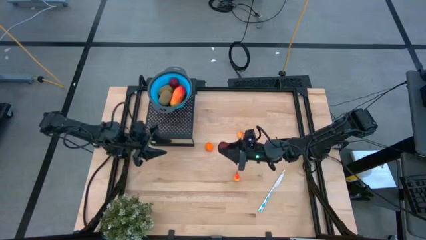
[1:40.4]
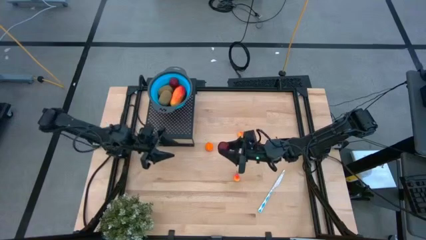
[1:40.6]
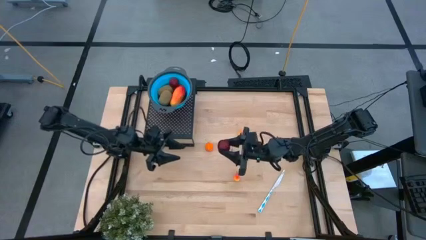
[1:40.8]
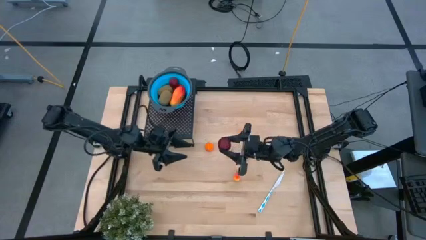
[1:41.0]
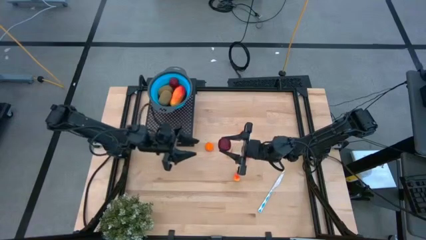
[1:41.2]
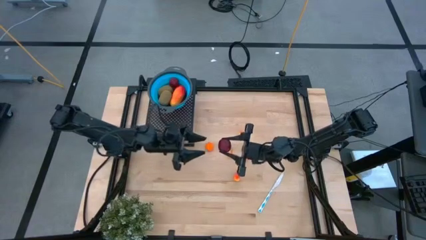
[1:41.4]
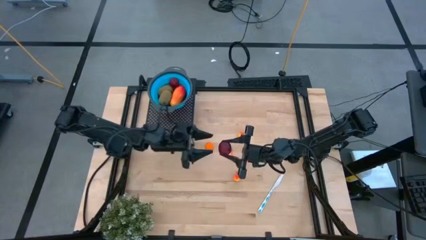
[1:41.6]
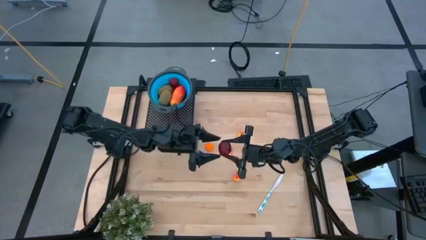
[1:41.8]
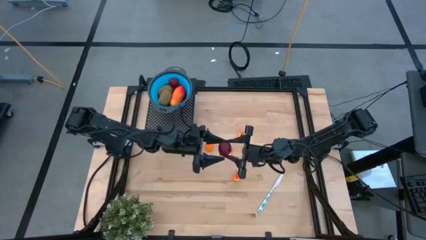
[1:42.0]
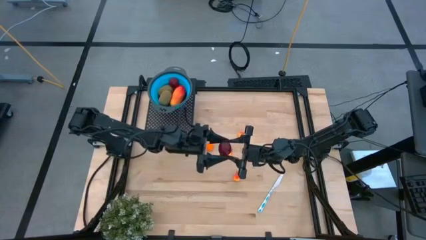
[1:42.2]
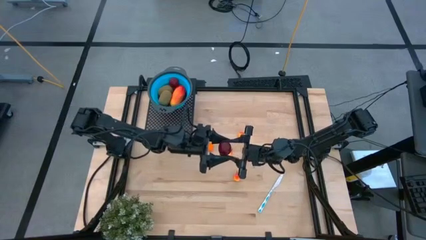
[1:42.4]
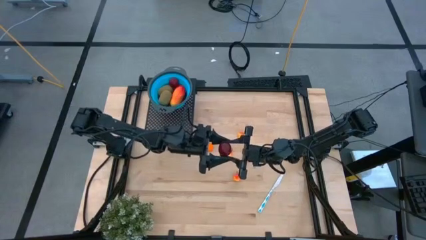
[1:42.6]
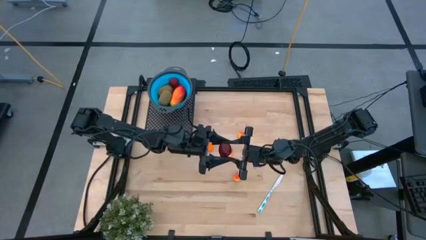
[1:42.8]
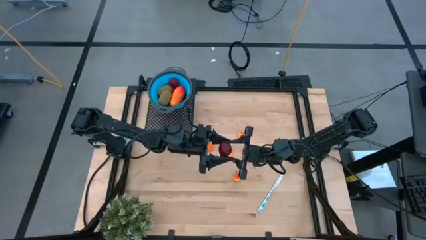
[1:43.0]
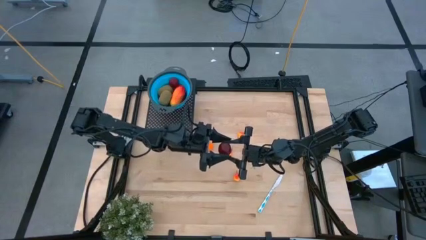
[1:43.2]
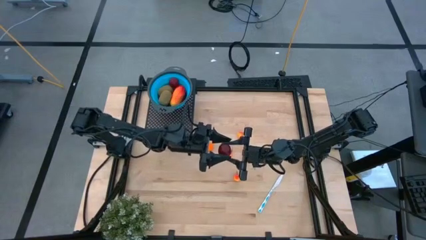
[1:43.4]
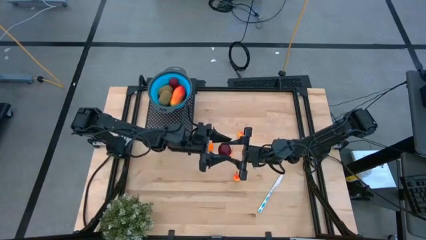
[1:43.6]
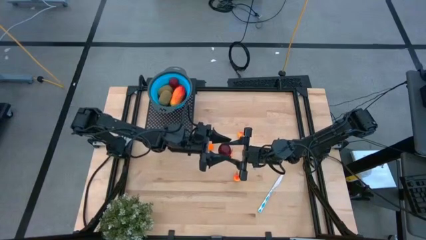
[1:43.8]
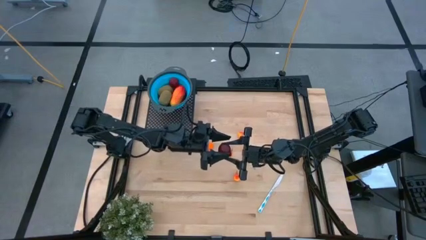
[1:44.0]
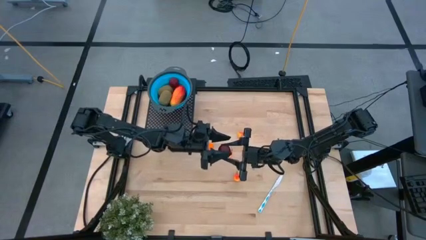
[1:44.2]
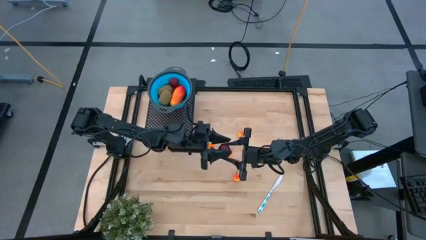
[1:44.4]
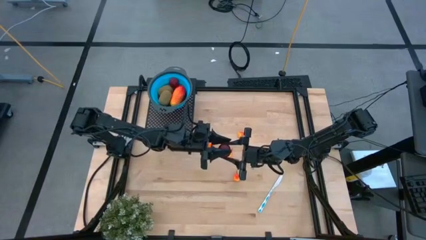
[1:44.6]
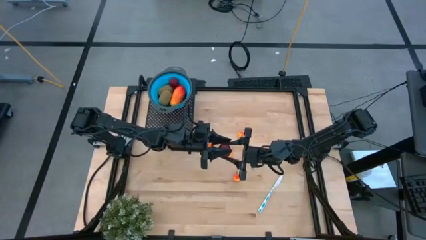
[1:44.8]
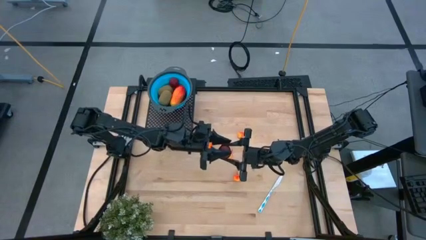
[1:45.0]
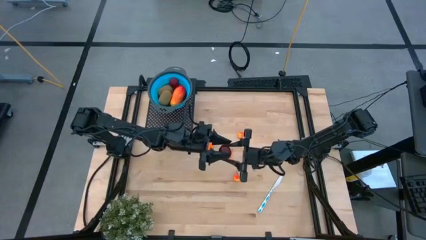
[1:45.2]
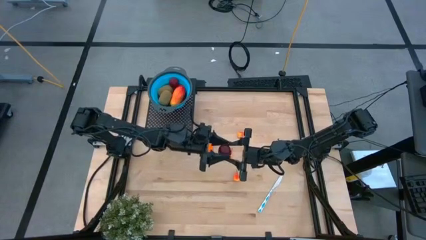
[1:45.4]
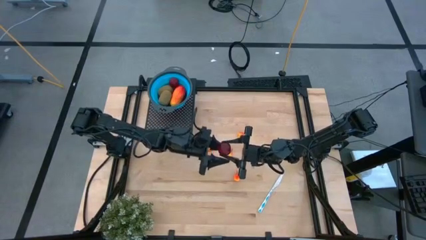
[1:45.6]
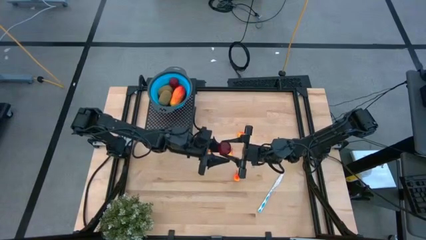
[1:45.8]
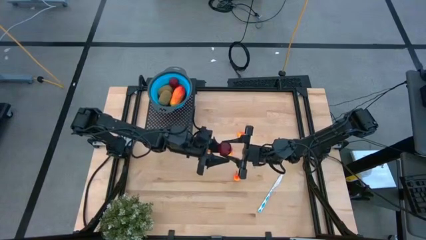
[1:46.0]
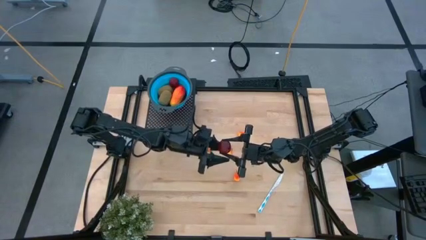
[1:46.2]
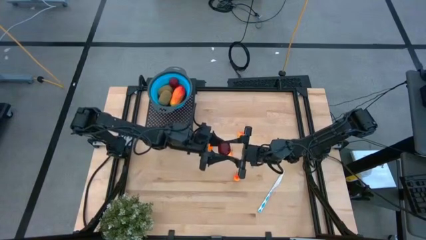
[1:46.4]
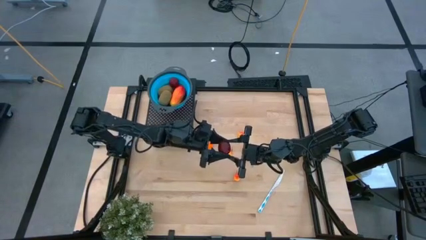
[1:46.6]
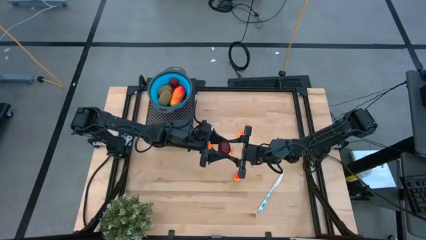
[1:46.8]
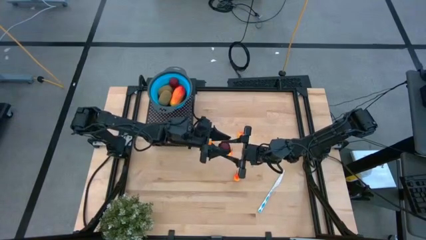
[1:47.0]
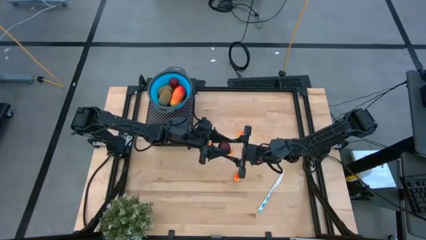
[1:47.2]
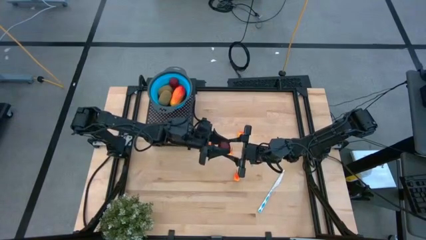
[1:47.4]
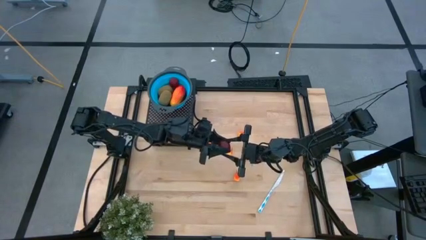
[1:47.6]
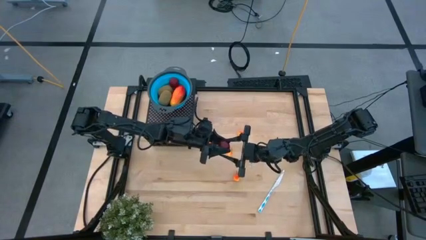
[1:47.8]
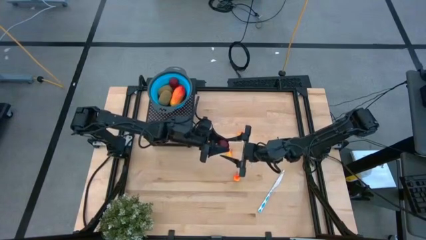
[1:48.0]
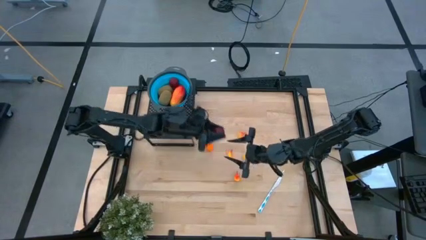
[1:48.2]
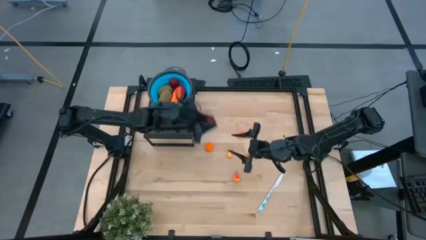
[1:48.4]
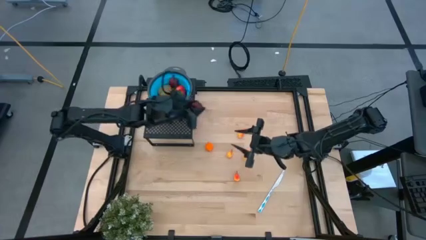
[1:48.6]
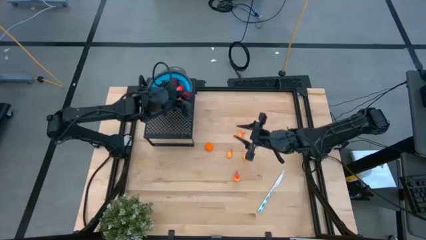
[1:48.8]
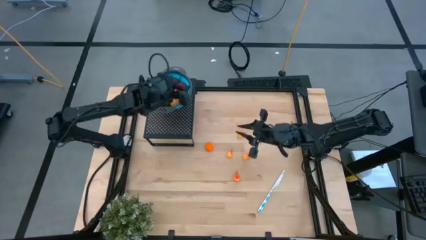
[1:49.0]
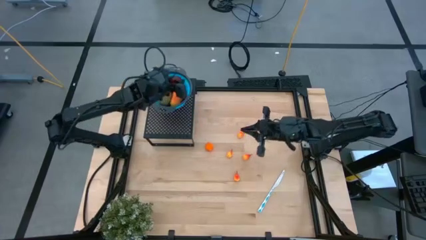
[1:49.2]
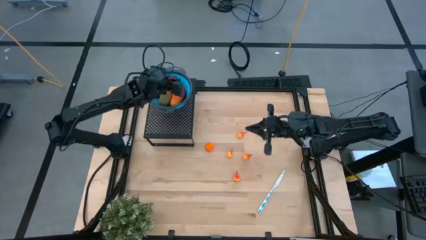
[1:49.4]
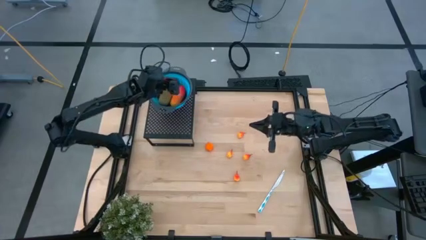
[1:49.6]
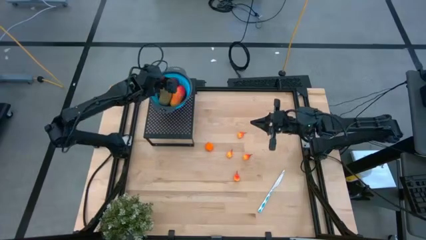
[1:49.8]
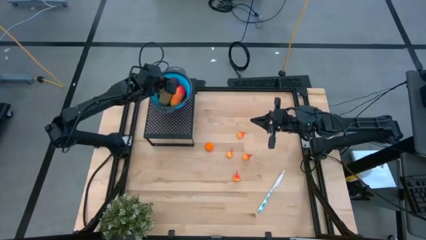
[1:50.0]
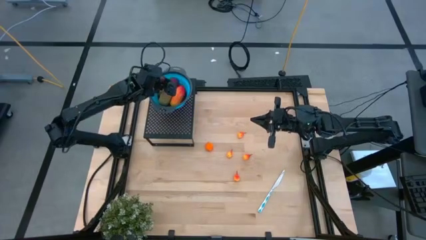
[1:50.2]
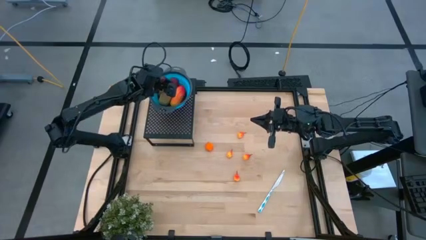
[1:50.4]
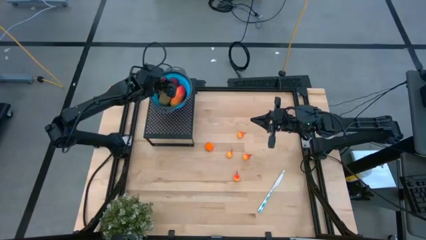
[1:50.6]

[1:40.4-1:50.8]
Task: Pick & Place Fruit
Put the pomegranate into the blue strainer bowl on the shelf

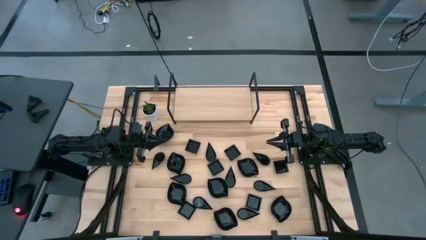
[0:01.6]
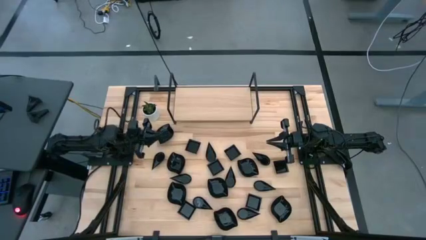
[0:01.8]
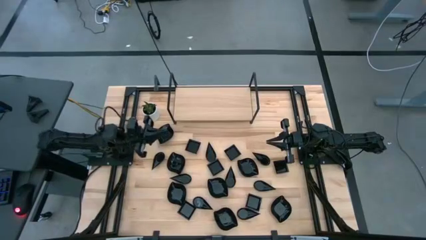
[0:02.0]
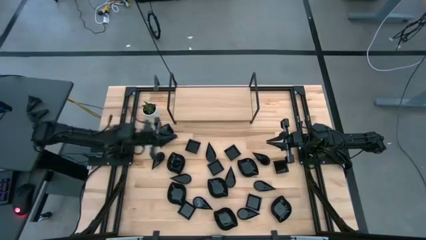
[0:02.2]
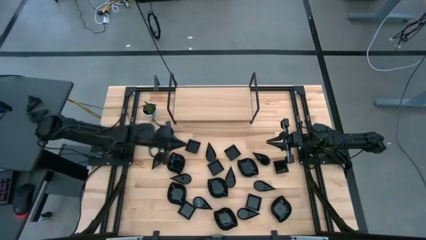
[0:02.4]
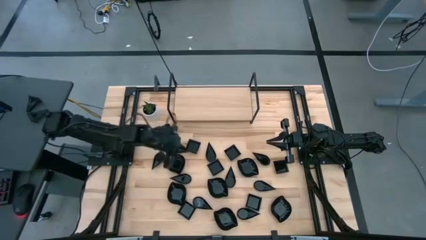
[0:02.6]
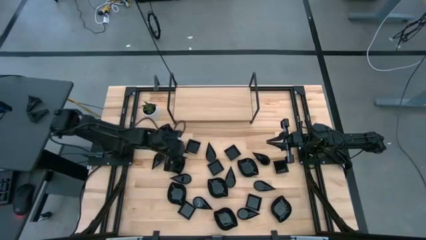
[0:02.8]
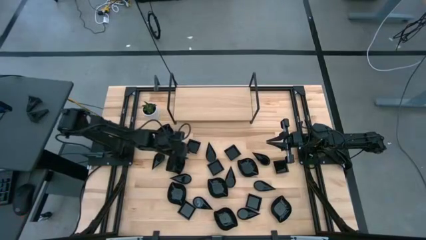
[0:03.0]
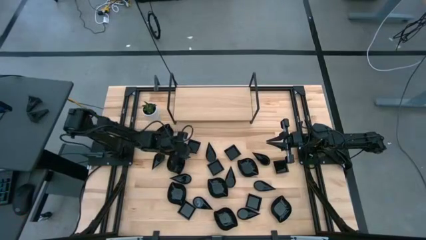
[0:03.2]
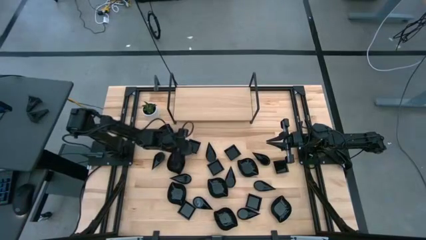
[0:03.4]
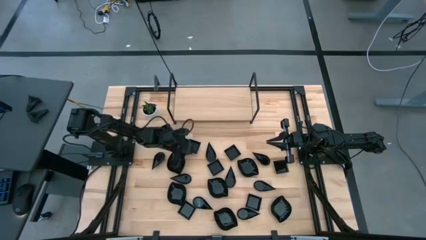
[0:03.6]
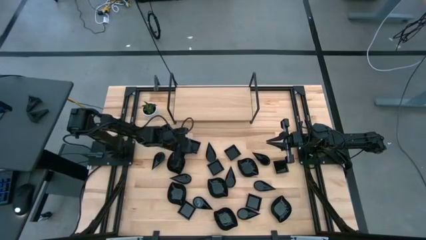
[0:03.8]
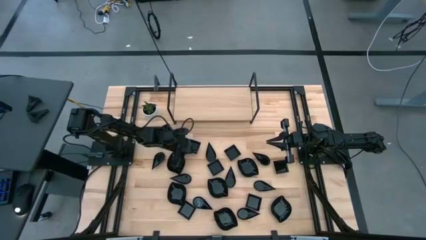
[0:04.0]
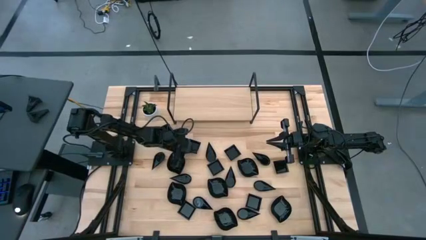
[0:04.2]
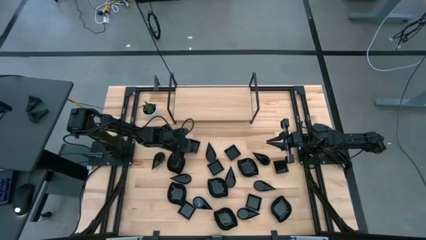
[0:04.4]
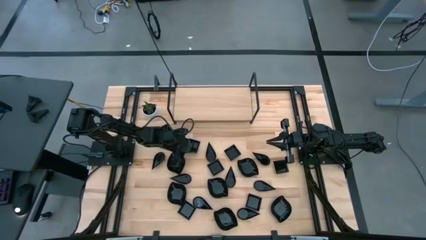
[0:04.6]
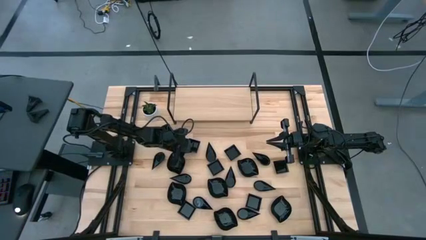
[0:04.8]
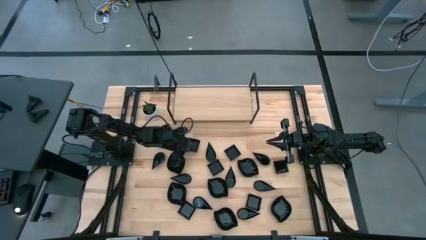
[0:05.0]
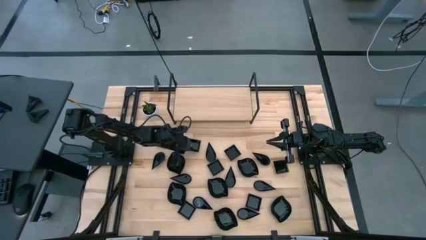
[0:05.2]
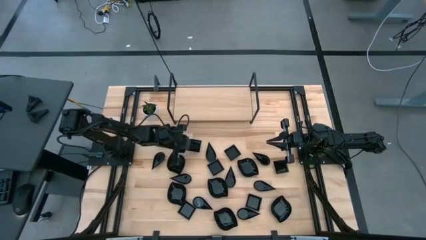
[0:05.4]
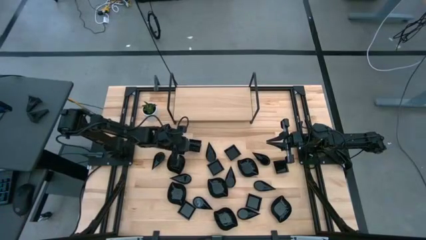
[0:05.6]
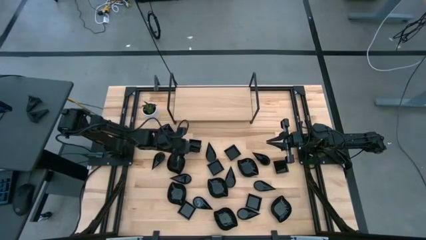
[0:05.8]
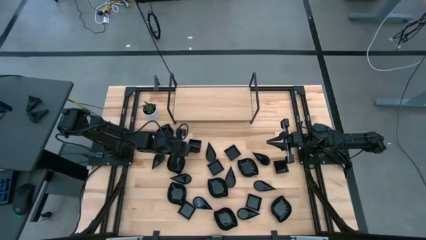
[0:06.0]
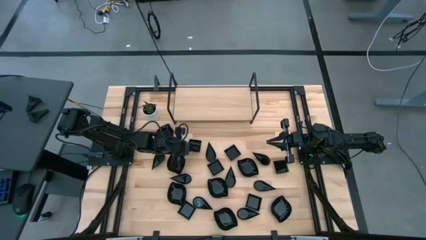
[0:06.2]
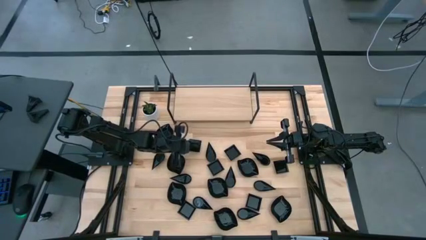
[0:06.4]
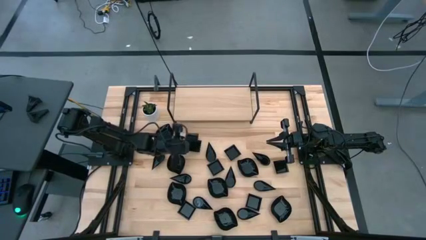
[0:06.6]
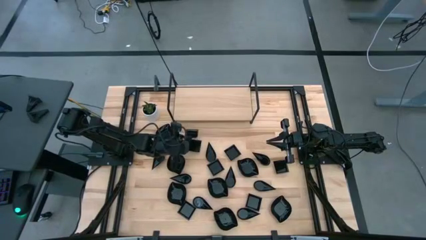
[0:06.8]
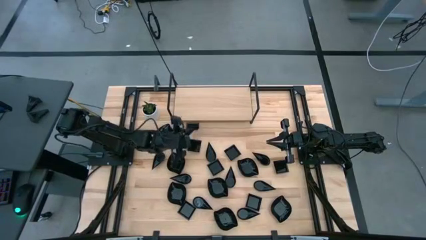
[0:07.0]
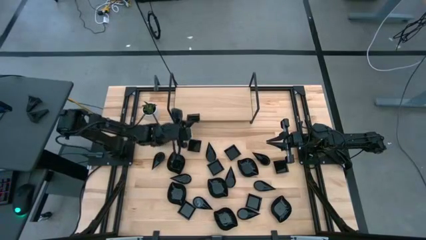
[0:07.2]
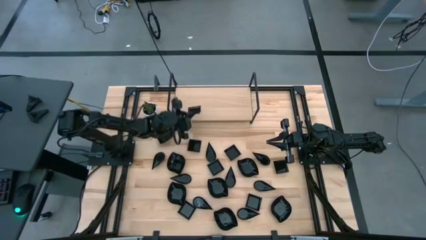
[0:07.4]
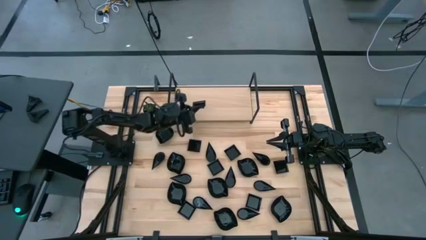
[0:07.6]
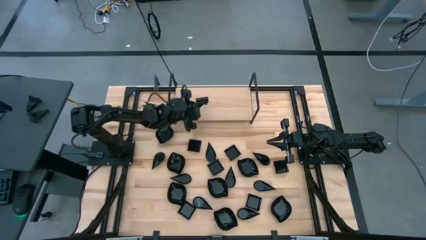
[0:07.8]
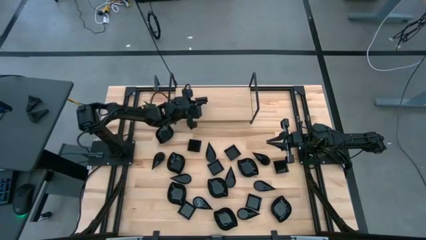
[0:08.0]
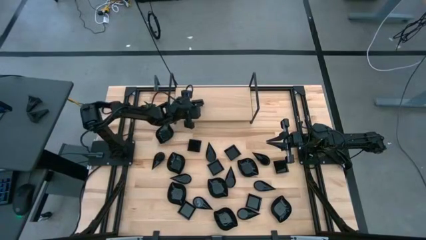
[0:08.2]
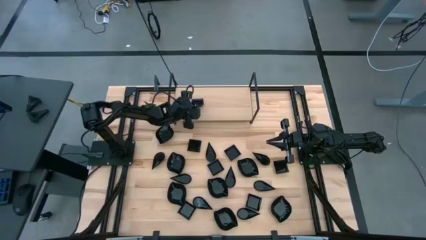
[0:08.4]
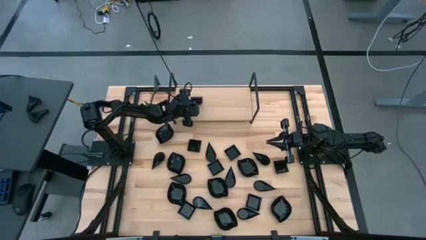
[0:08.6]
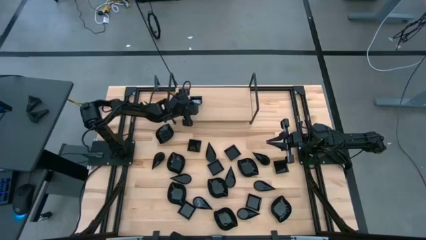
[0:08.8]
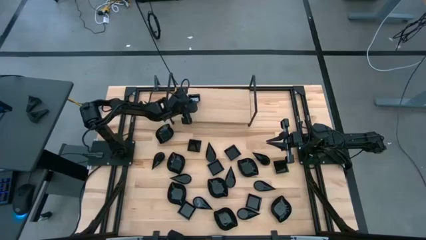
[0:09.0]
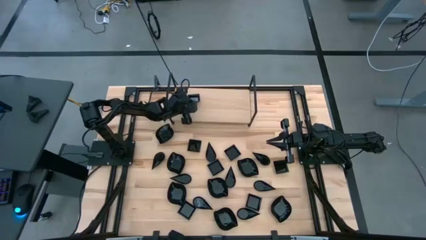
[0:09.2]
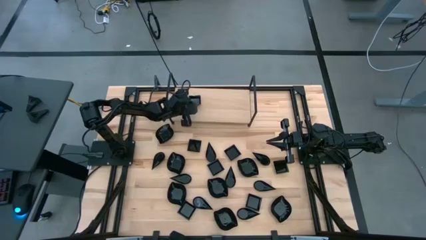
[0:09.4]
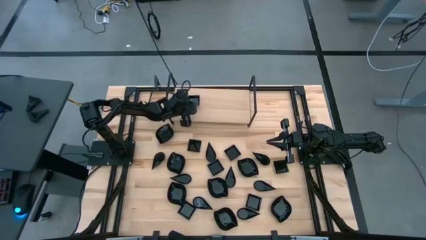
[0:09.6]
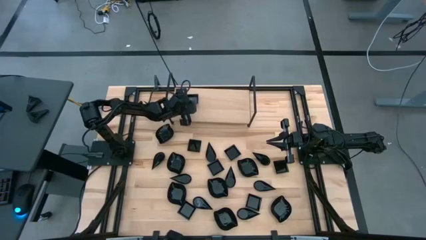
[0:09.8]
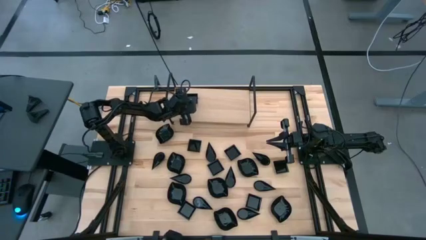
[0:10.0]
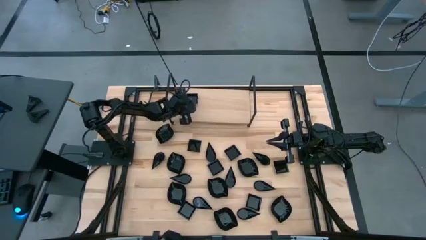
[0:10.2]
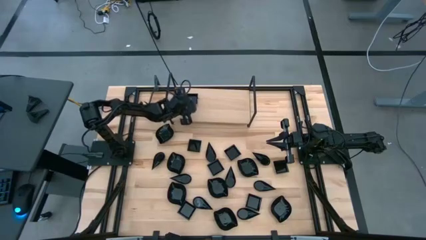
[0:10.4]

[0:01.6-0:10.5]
Task: Pick & Place Mini shaped plates
Put the black square bowl on the shelf
